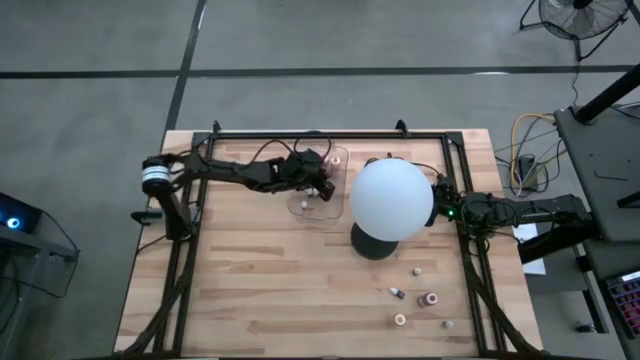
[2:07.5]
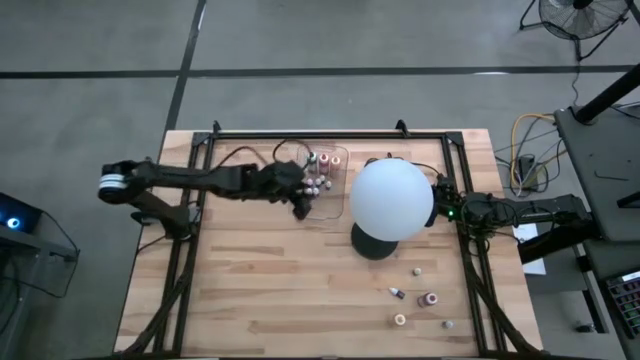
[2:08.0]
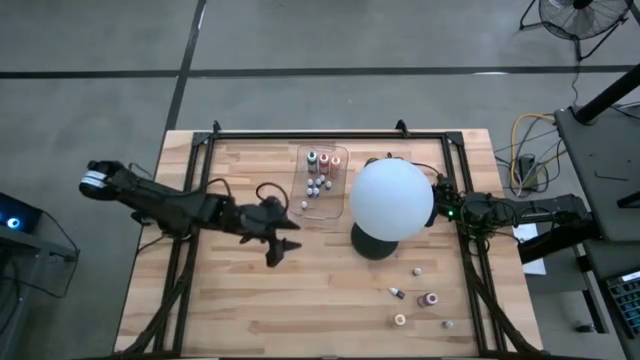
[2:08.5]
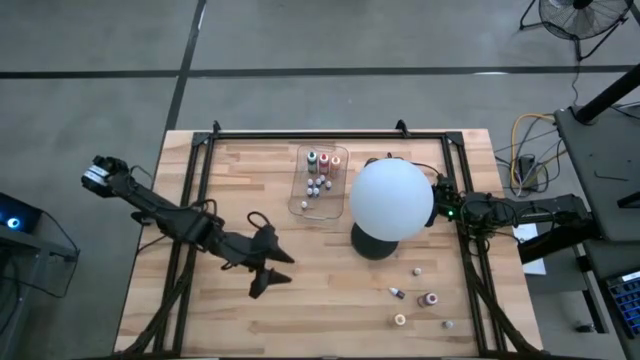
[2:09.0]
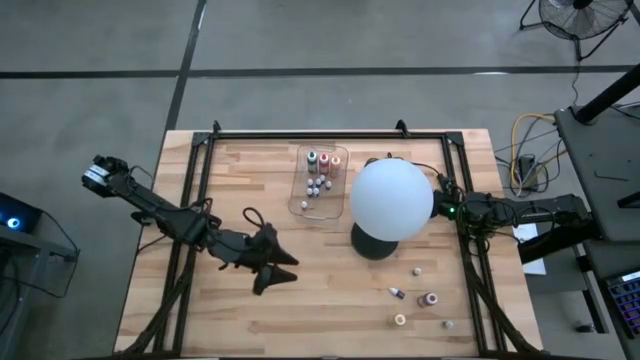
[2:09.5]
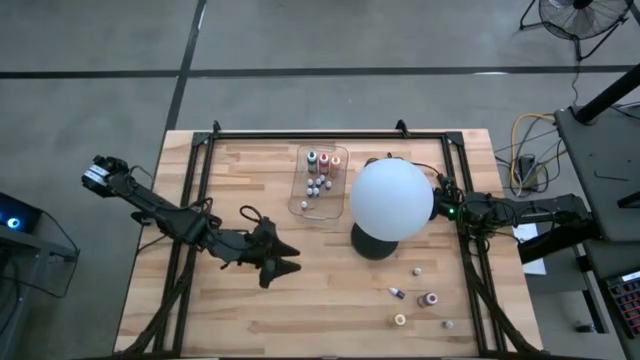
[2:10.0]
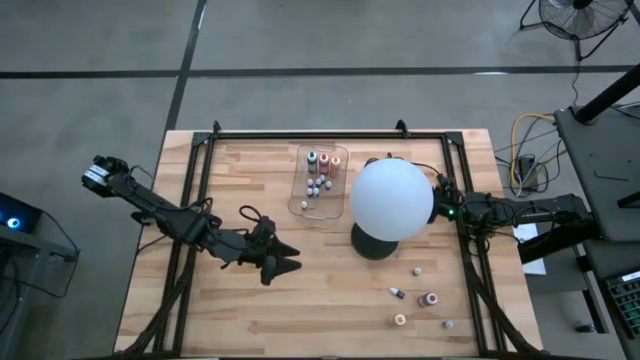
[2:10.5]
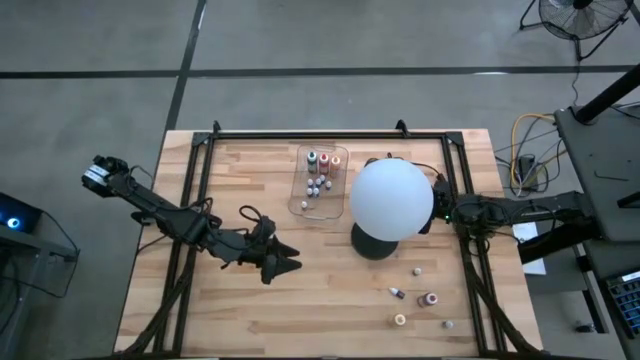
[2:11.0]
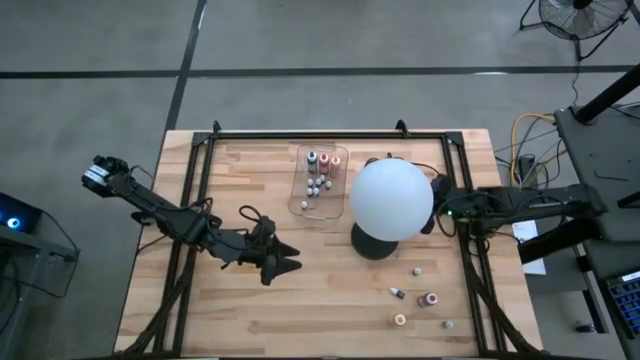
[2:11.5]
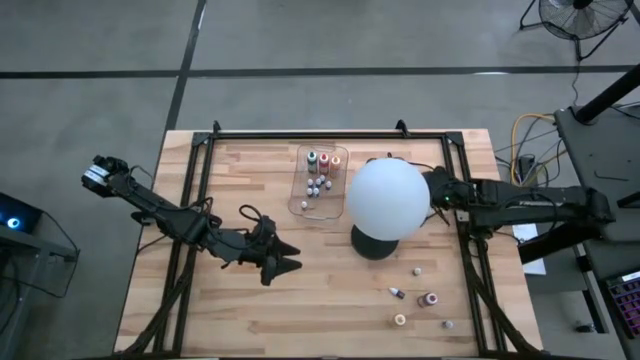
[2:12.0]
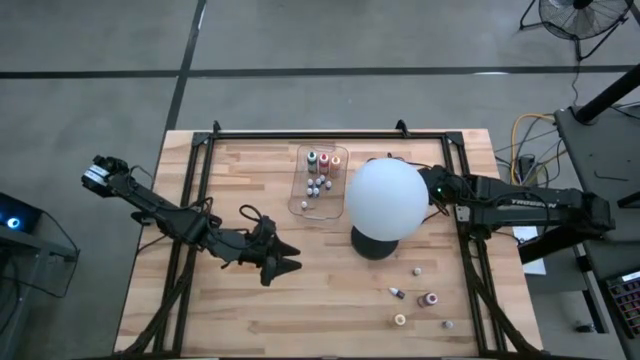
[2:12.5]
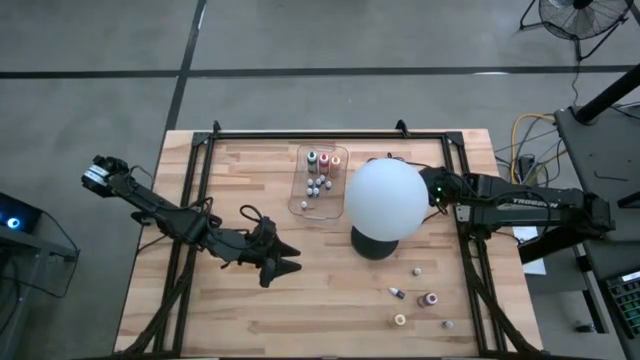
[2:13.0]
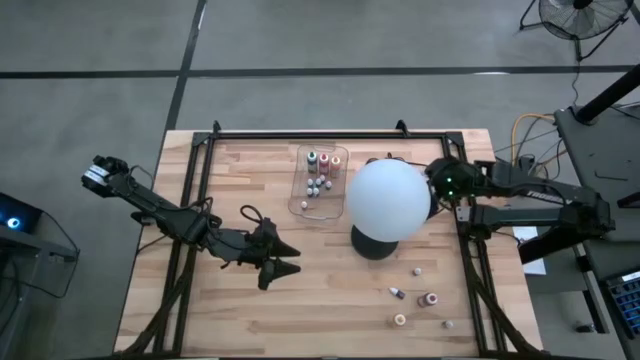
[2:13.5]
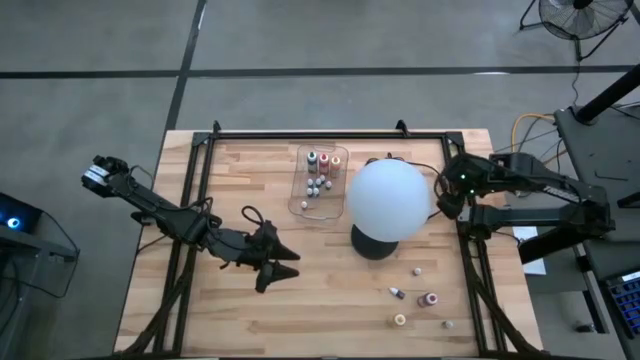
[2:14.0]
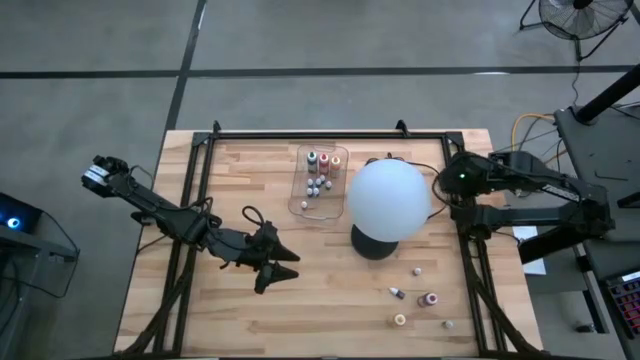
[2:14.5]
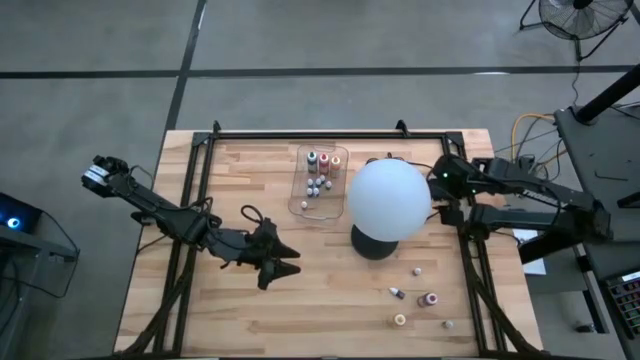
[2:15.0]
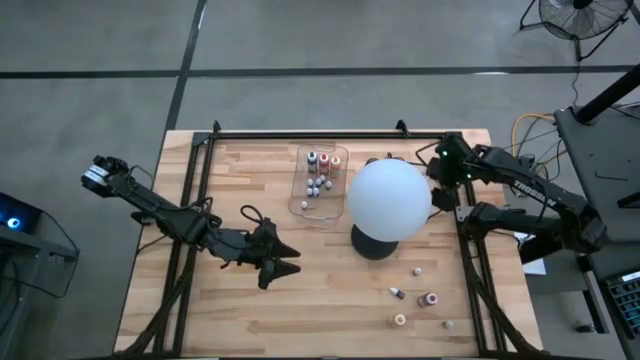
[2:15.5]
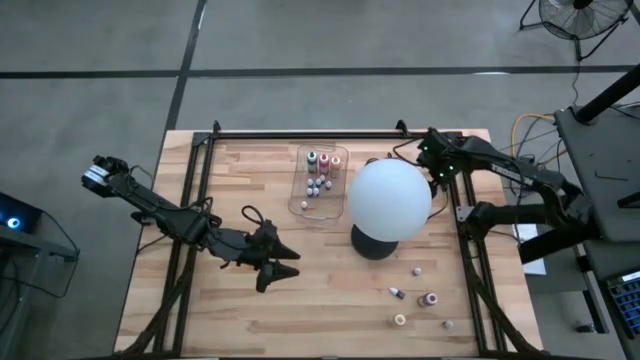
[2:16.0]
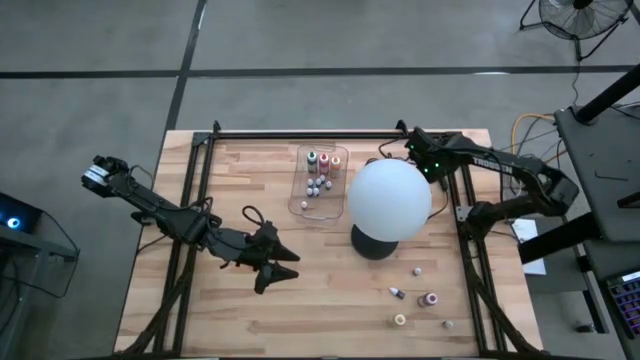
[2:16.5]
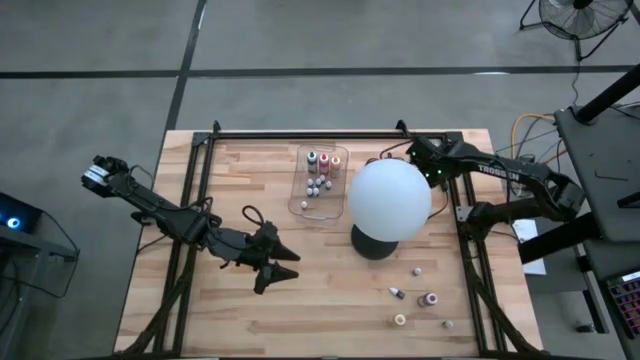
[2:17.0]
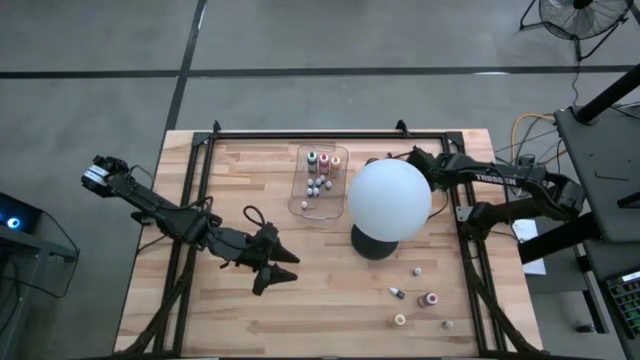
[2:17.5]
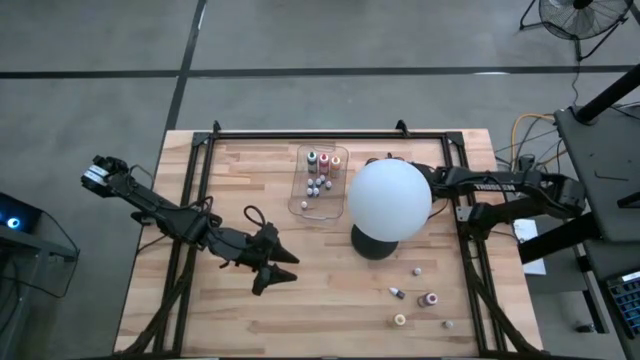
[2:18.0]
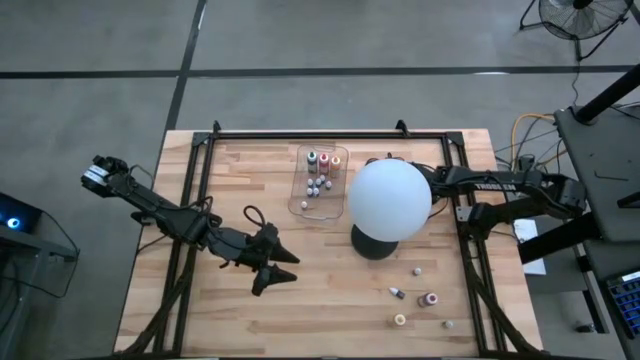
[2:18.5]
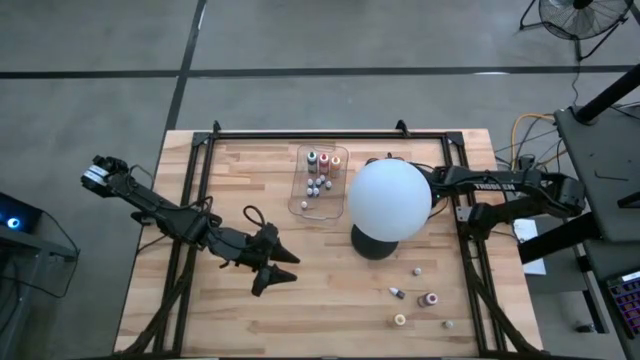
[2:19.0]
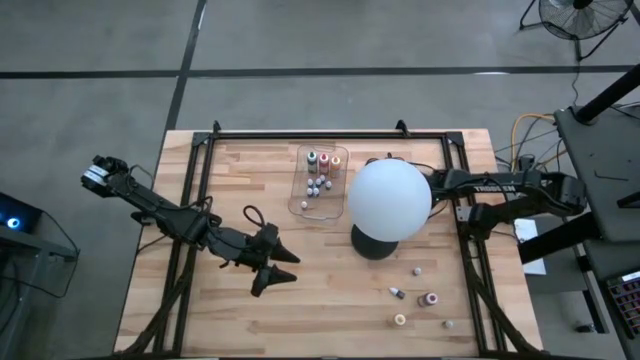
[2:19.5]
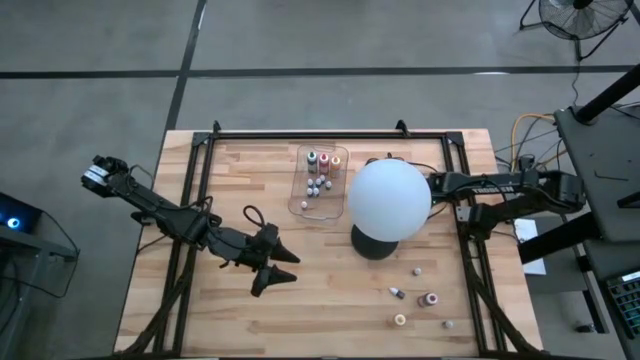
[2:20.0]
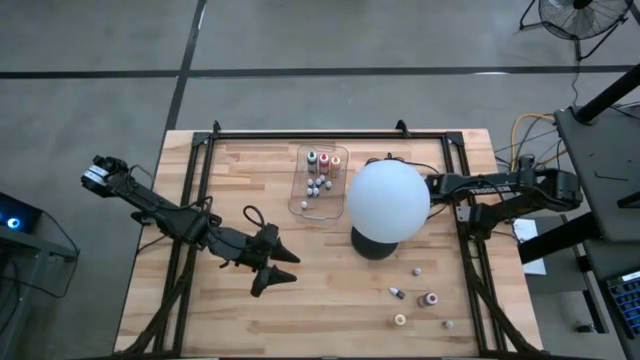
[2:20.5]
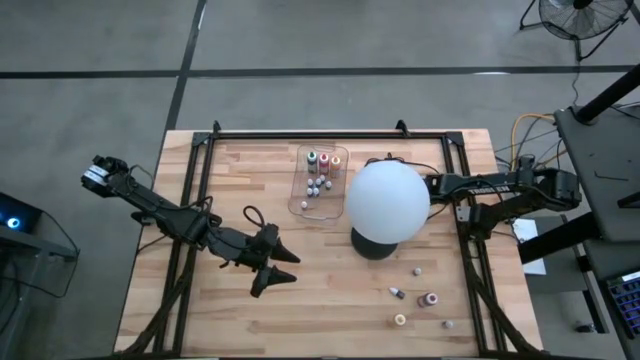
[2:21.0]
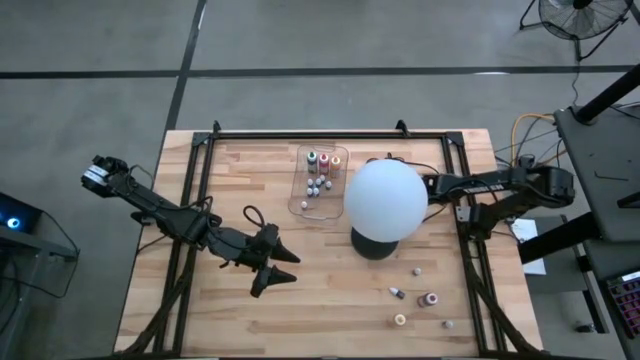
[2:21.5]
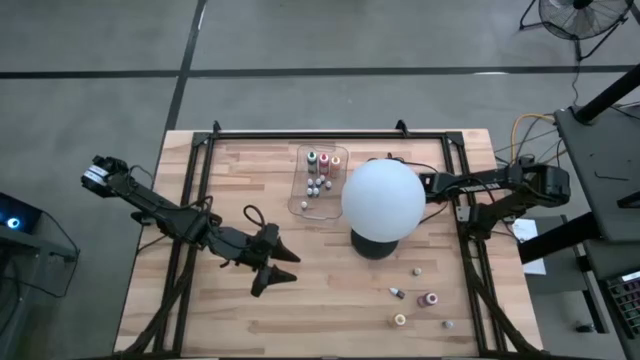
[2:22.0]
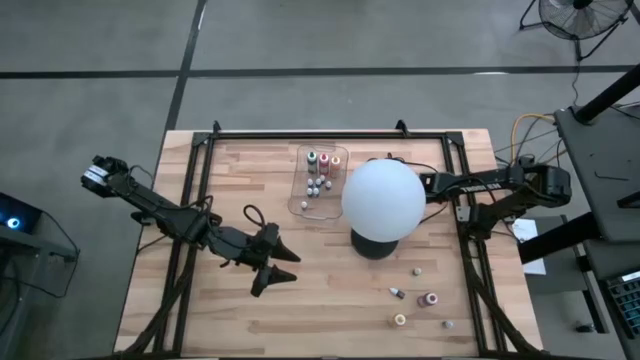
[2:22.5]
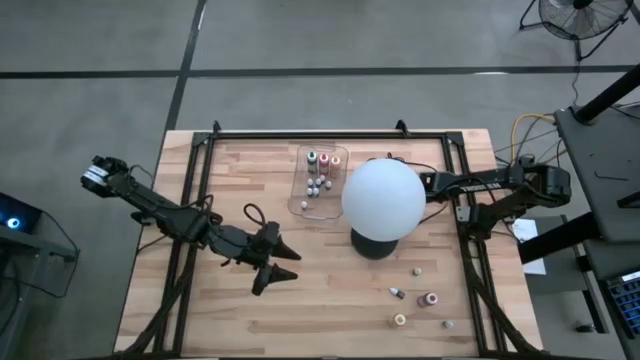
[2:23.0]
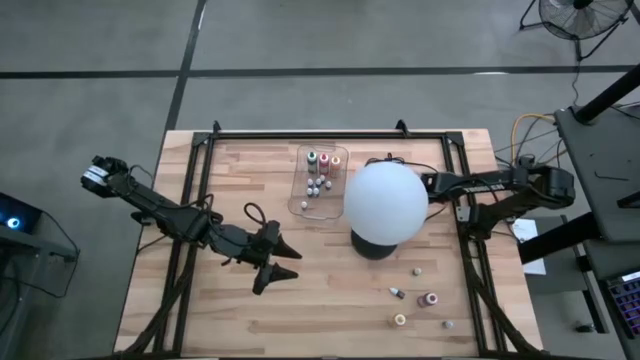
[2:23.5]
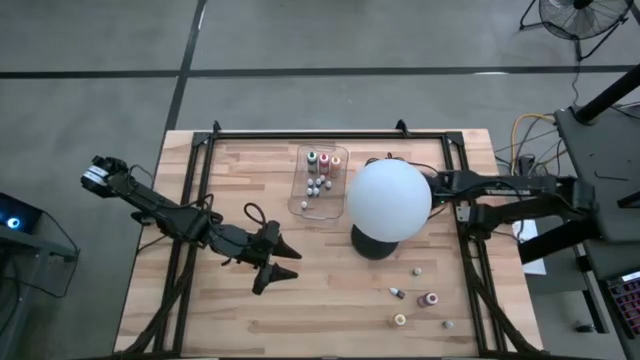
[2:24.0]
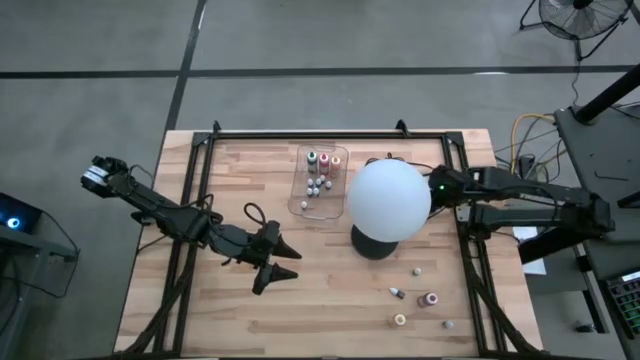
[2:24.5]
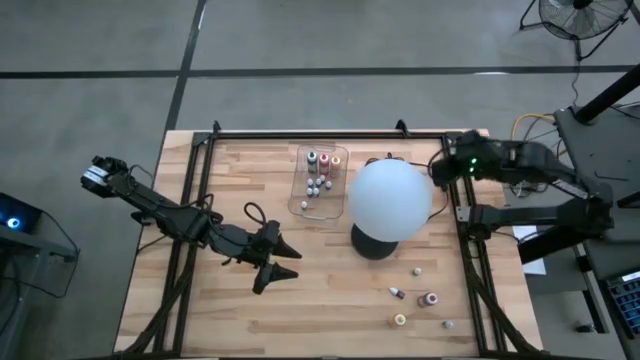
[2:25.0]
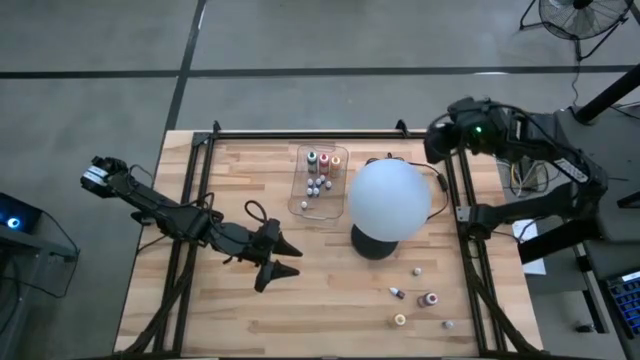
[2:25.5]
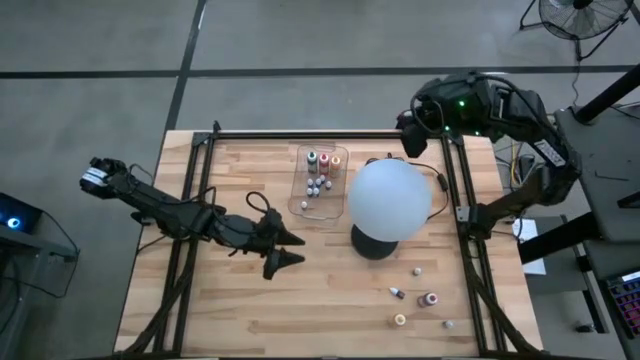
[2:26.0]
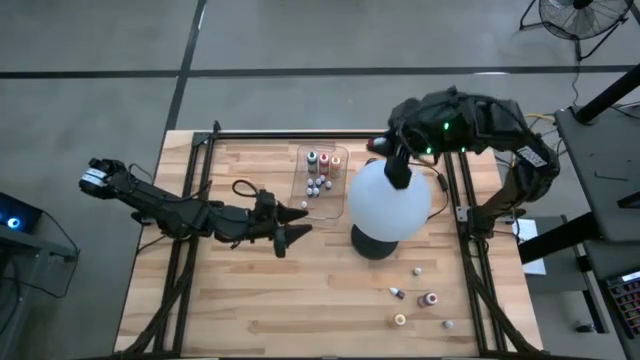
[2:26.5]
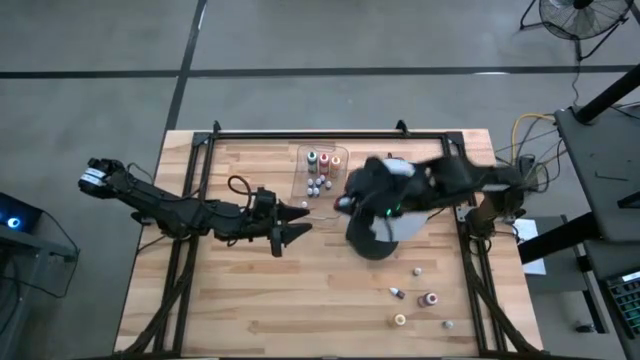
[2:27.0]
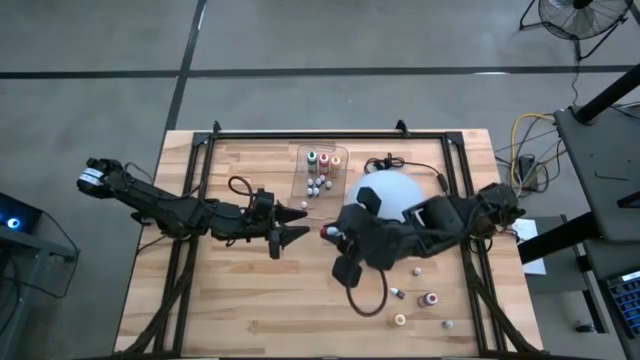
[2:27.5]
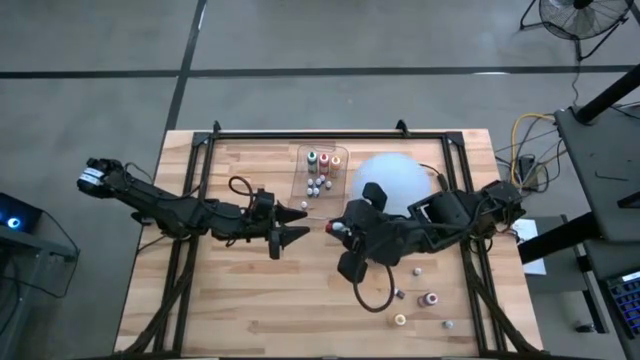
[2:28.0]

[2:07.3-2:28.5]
Task: Pick & Place food coloring
Put the small red food coloring bottle into the transparent bin

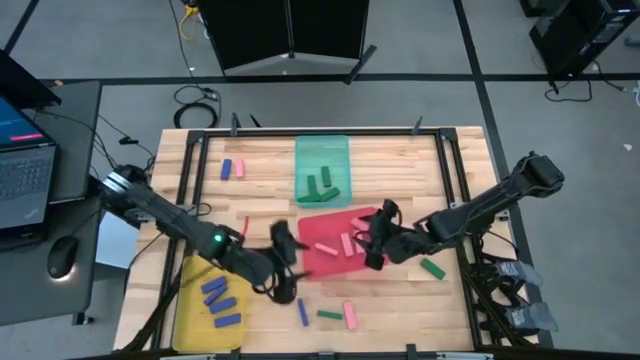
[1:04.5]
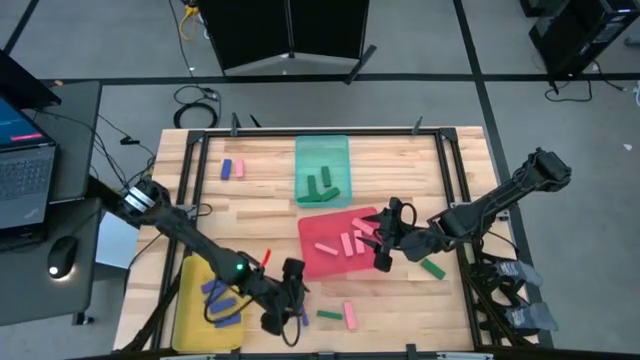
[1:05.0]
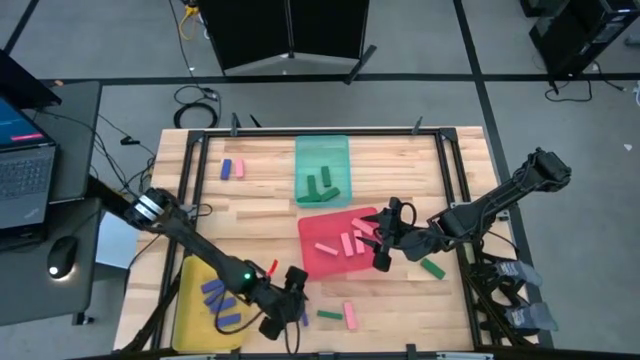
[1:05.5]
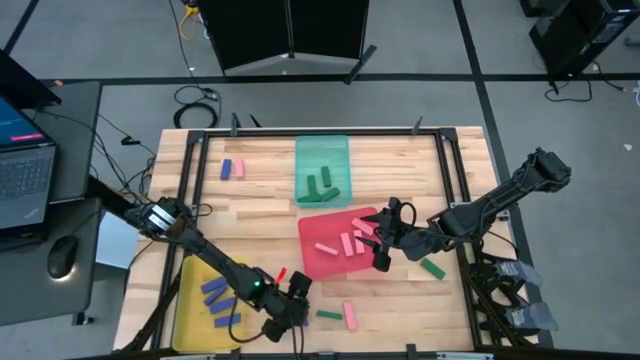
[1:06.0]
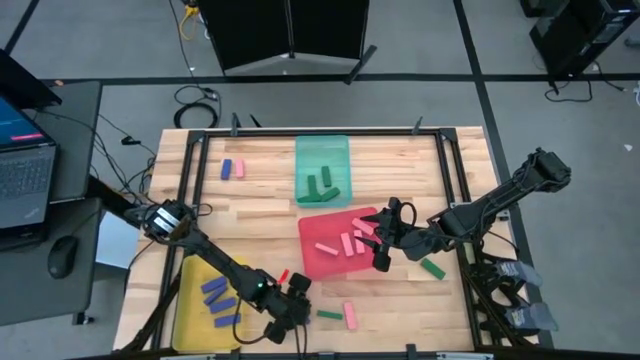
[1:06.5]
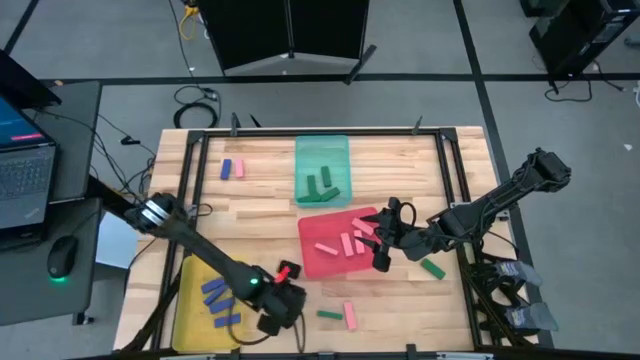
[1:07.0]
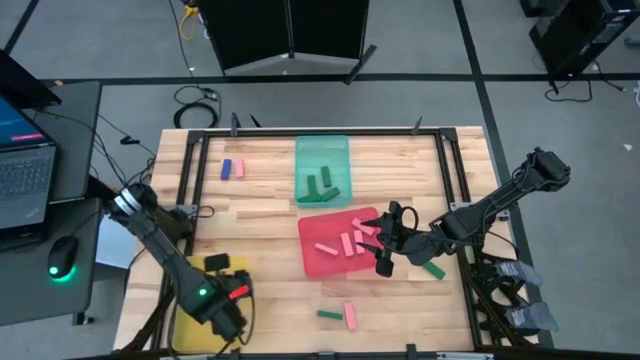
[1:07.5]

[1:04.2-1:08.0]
Task: Sort blocks
Put the blue block into the yellow bin
